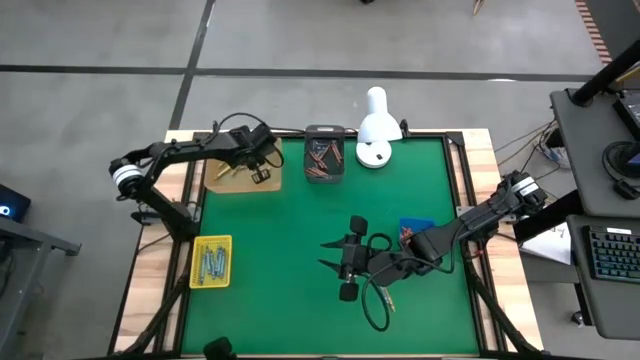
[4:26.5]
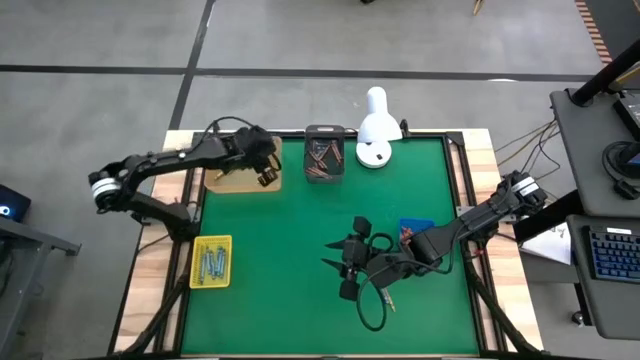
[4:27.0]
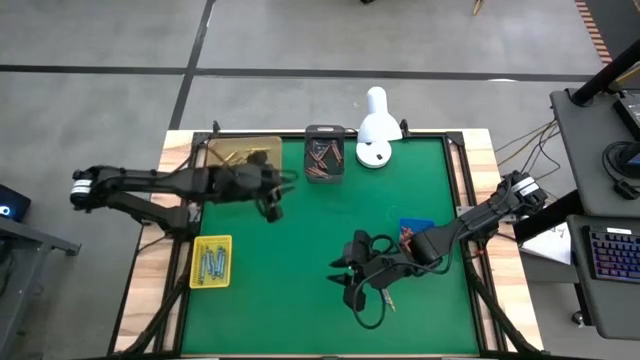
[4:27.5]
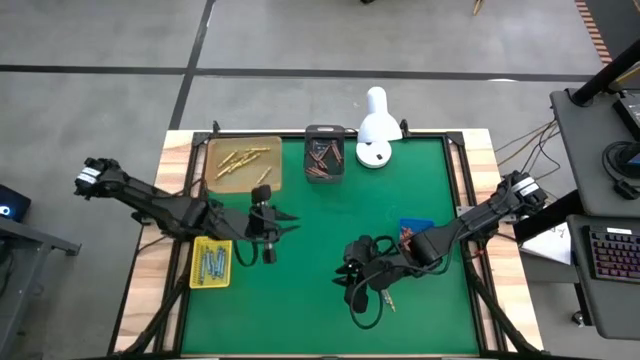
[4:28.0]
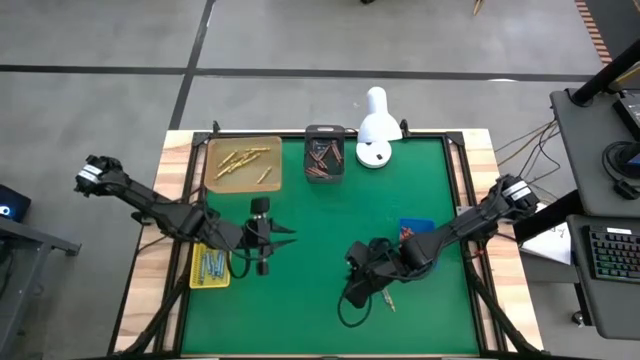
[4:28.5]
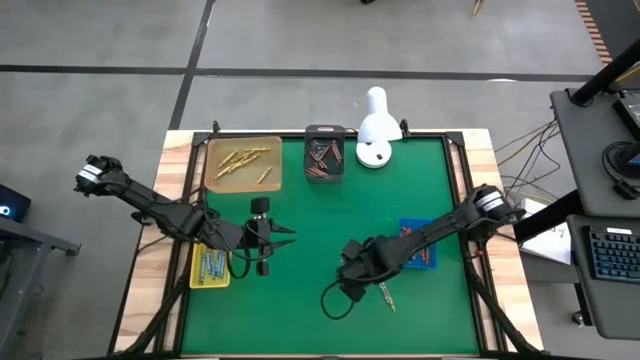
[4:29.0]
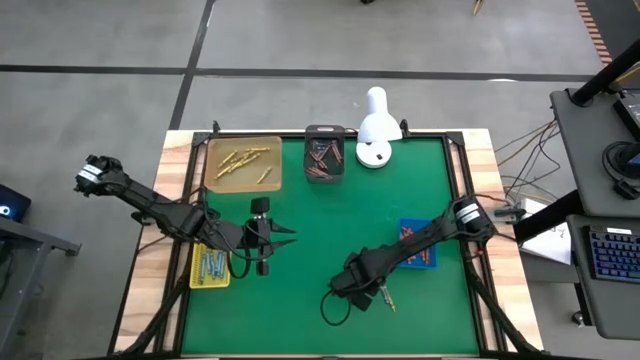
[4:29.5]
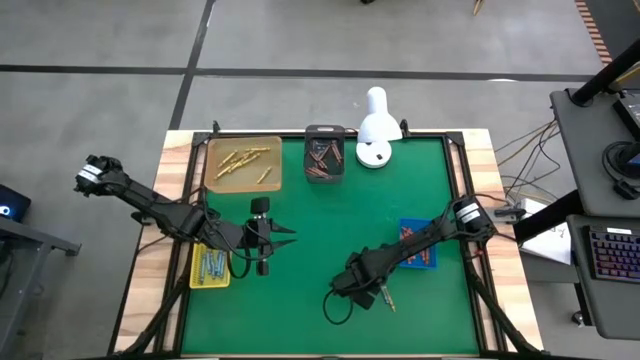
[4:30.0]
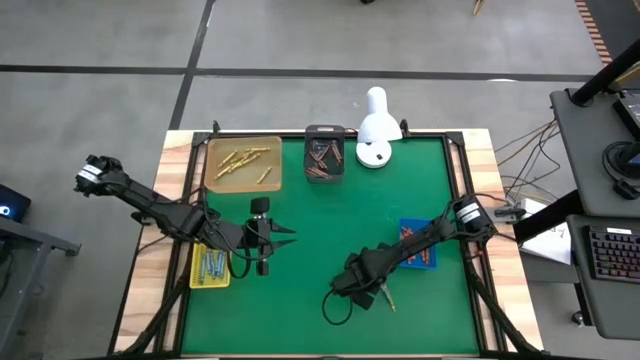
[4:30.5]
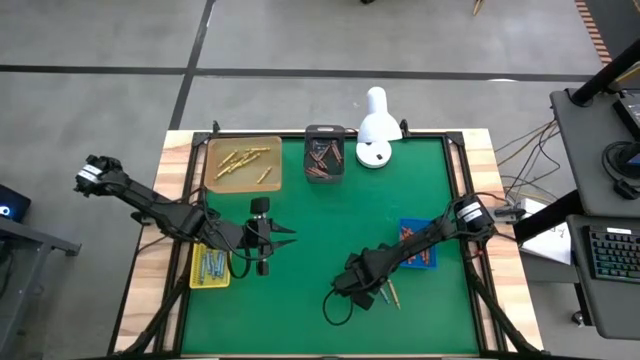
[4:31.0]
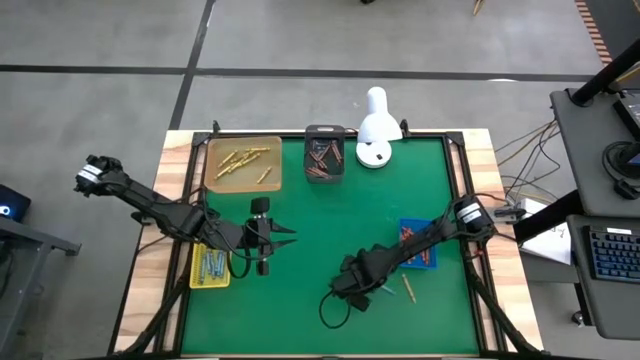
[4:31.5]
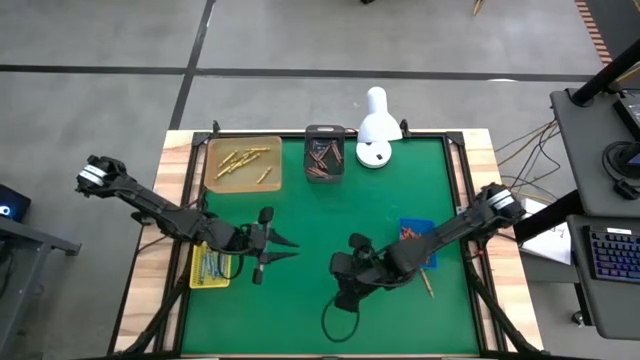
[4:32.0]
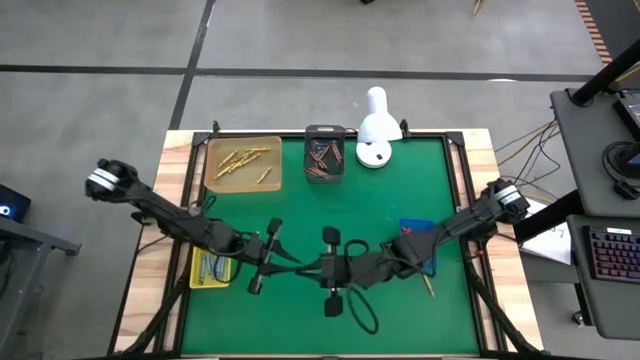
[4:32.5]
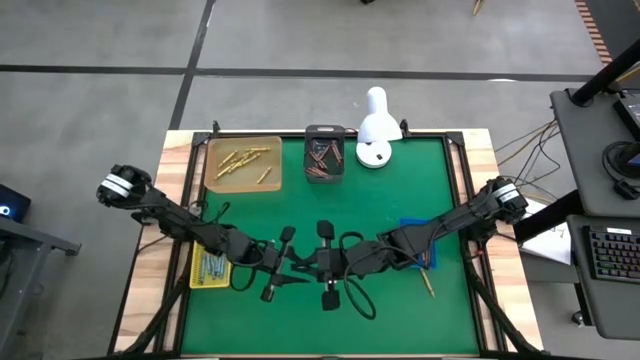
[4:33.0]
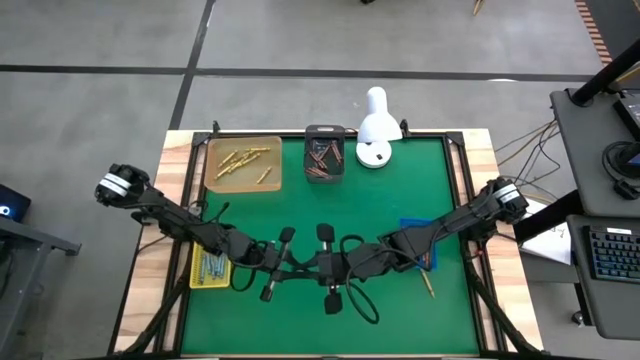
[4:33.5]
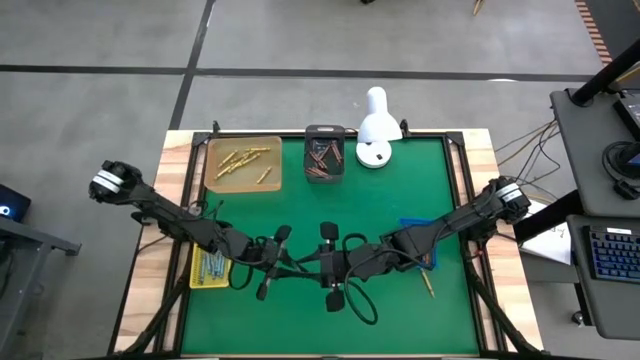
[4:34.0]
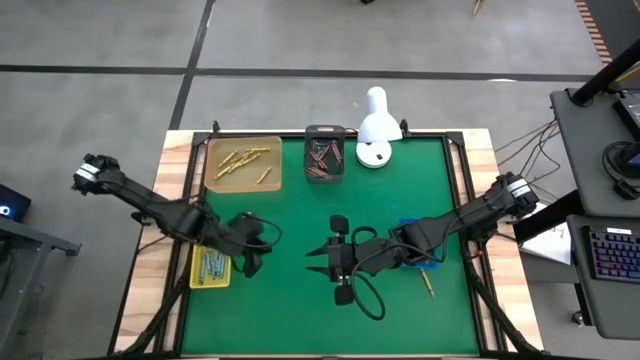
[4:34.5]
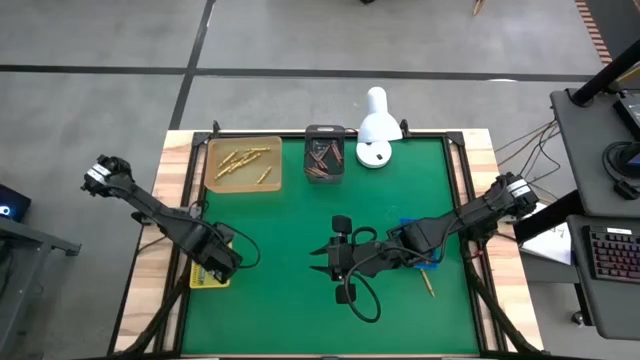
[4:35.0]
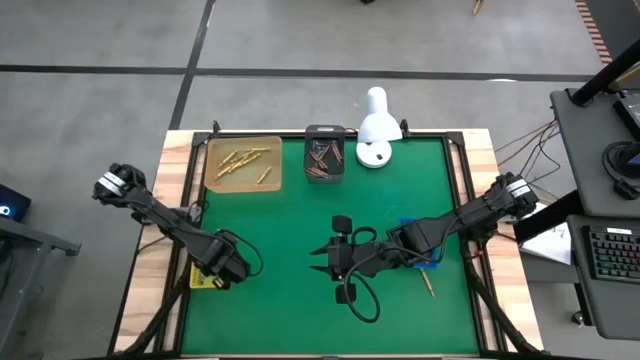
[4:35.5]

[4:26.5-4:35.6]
Task: Sort crayons
Put the blue crayon into the yellow bin

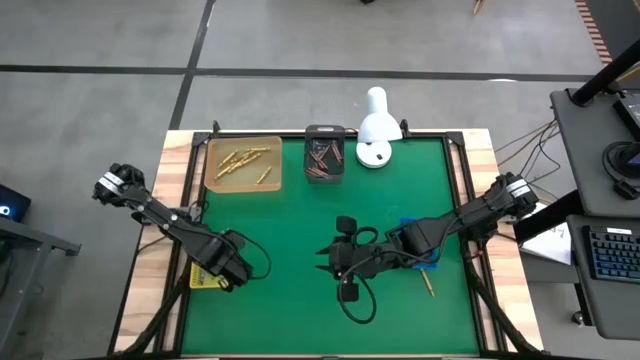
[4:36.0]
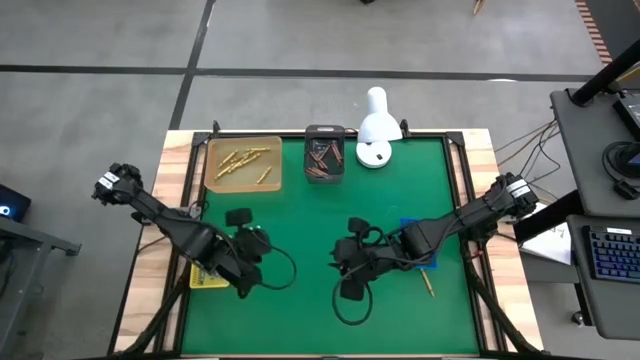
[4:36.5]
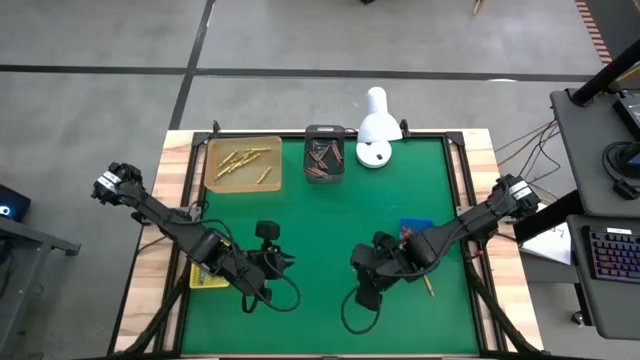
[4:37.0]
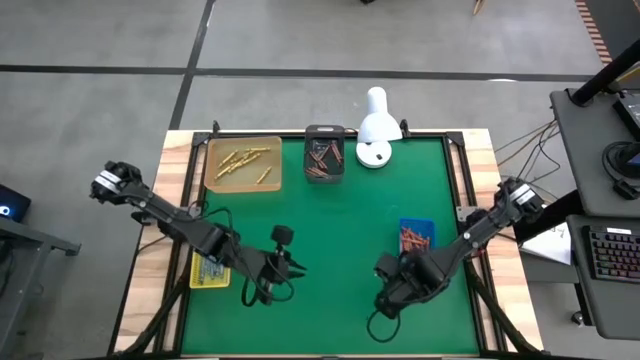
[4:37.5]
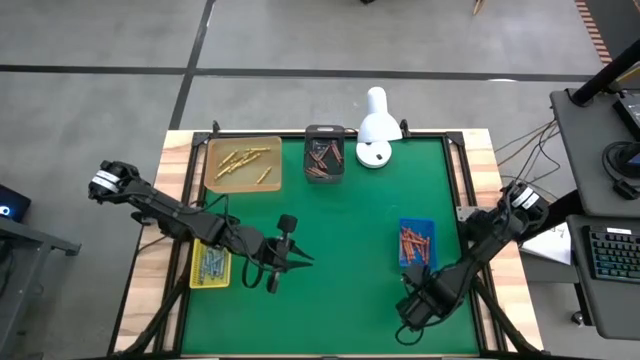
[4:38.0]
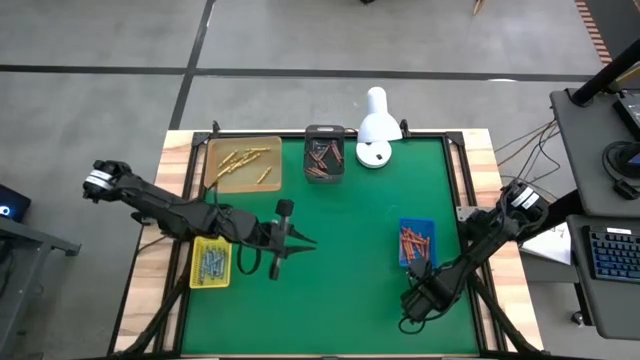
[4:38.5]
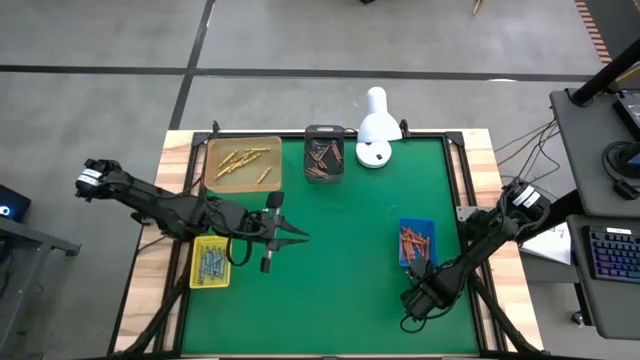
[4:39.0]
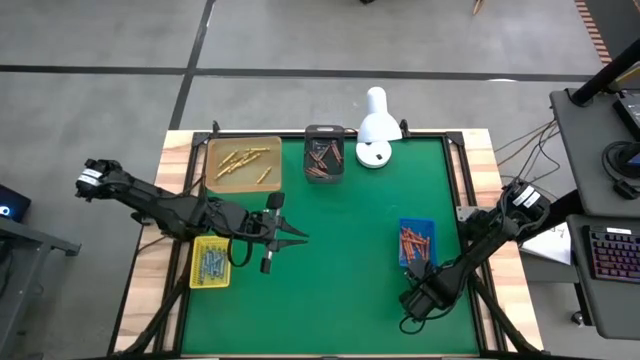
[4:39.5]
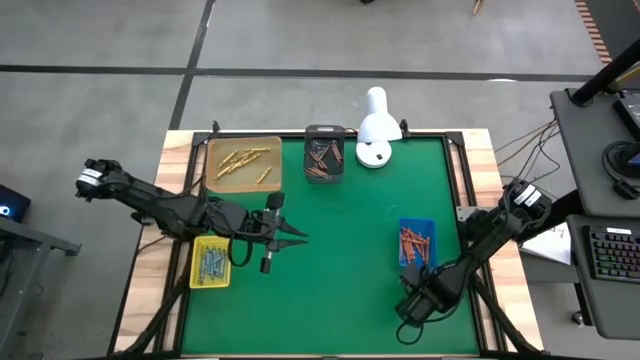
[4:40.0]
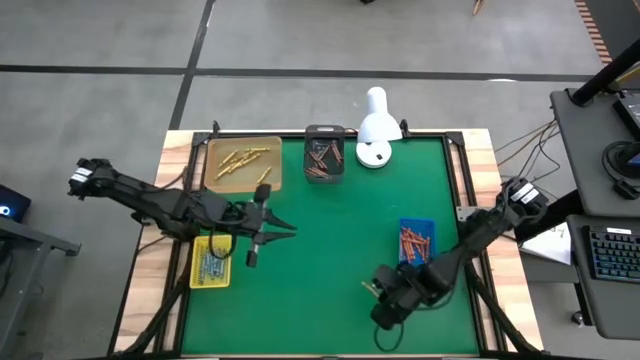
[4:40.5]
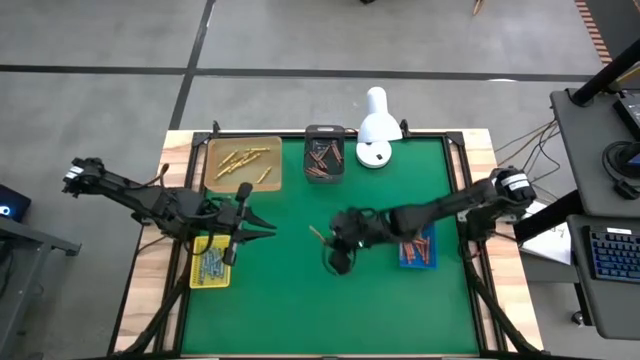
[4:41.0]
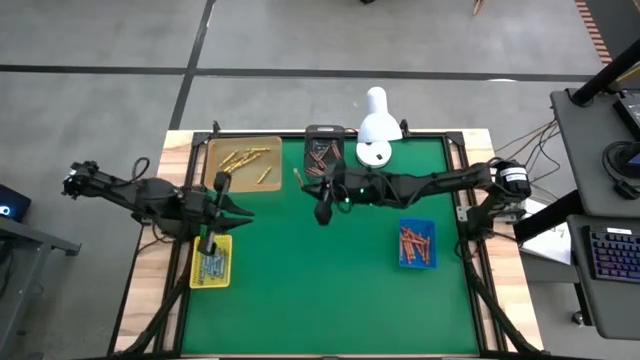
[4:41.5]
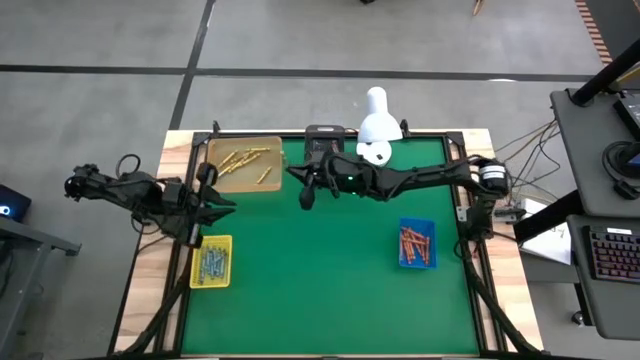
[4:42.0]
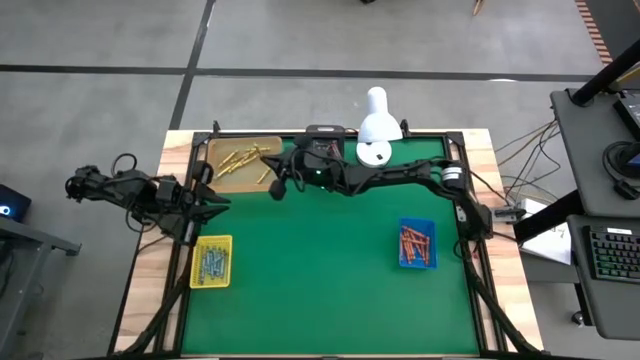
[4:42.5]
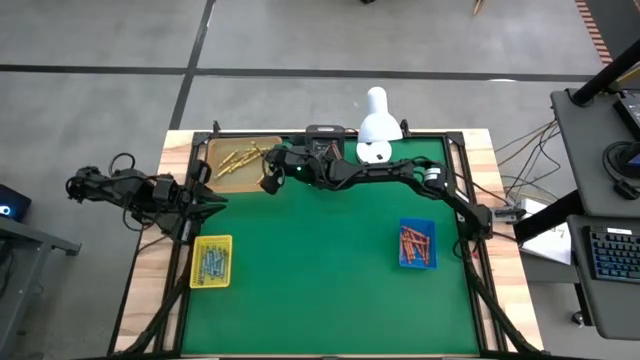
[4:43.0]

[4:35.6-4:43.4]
Put the green crayon into the orange bin

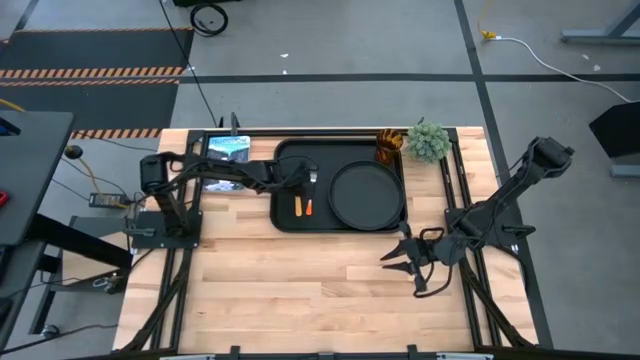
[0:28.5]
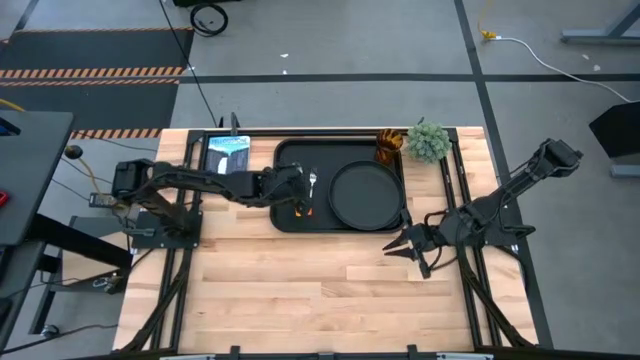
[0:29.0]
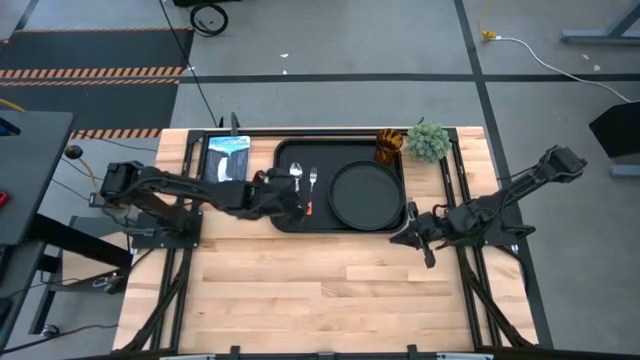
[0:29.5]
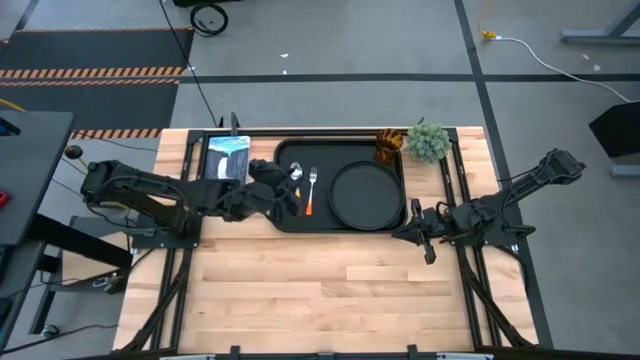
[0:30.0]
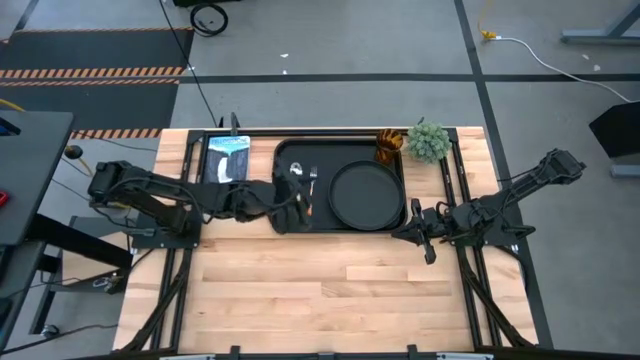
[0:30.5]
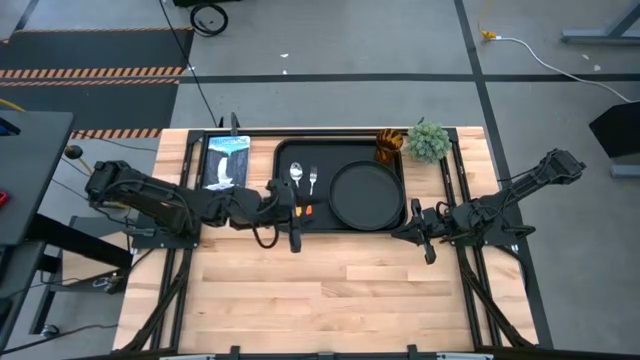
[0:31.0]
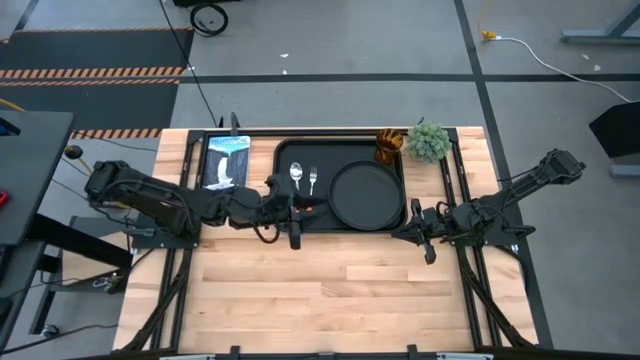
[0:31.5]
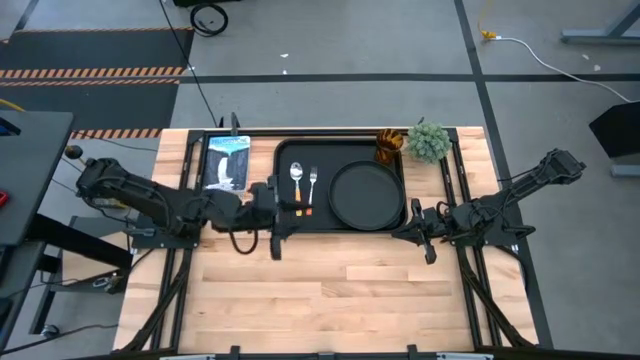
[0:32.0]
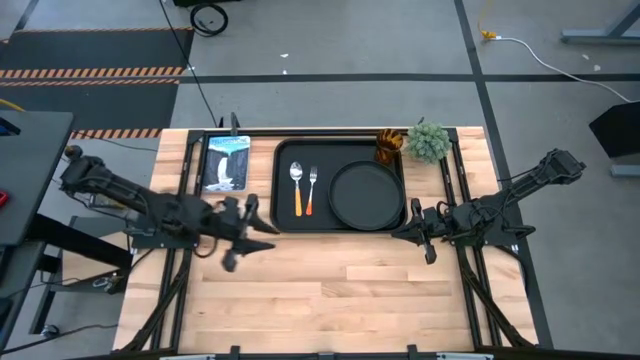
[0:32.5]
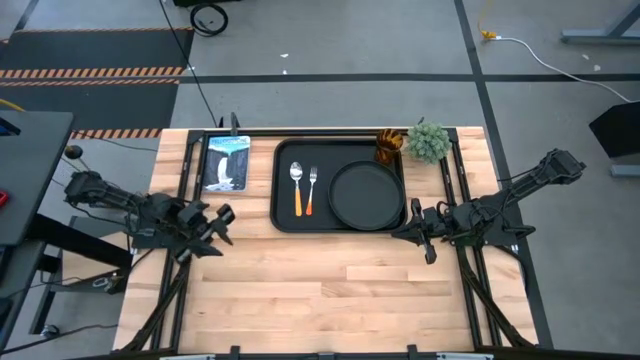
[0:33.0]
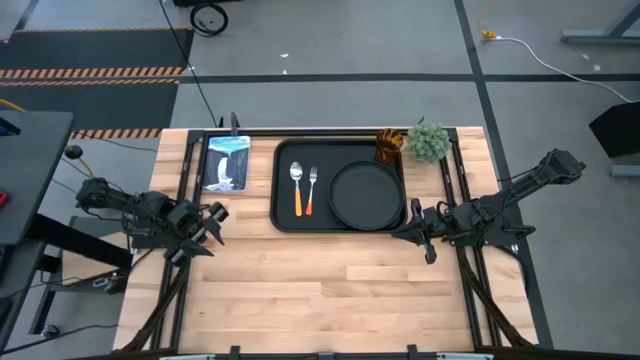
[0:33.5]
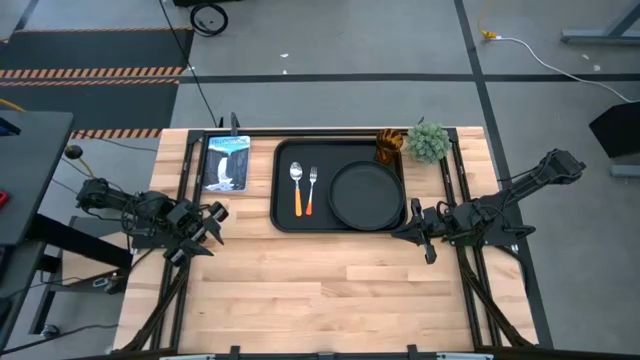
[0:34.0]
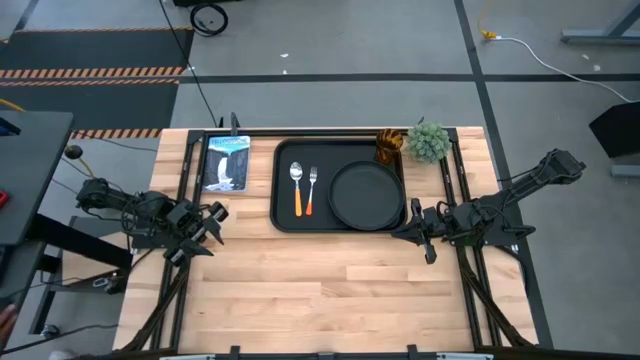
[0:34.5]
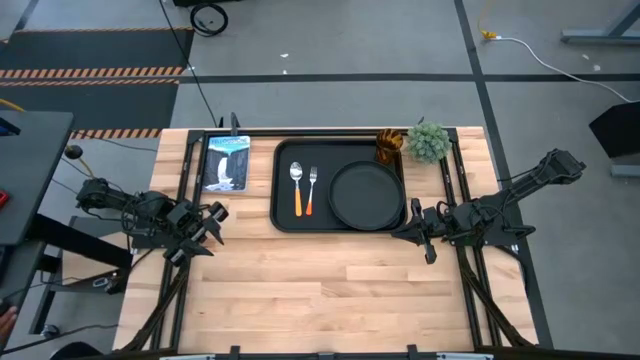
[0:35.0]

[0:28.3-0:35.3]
Task: Pick and place plate/cup/fork/spoon on tray
Return to Home Position
